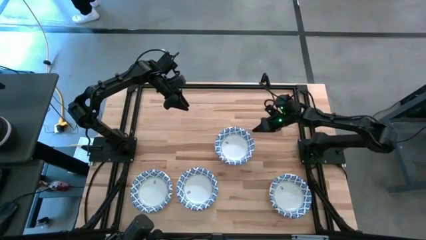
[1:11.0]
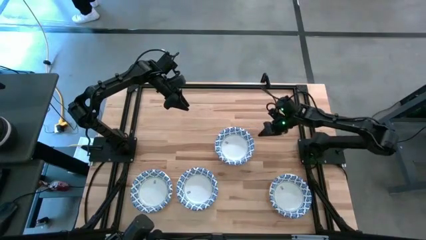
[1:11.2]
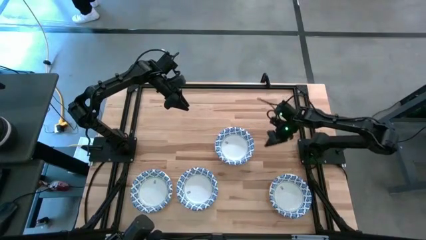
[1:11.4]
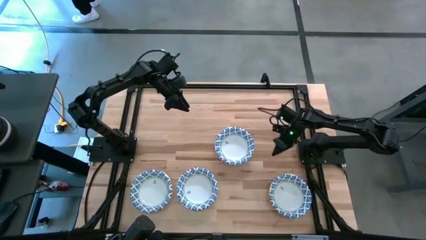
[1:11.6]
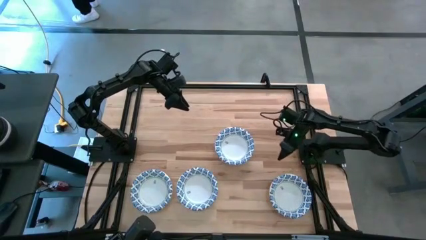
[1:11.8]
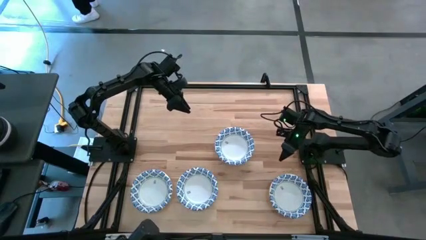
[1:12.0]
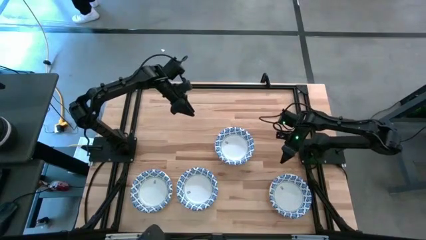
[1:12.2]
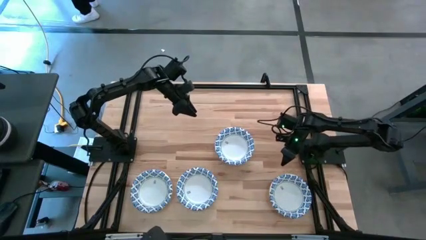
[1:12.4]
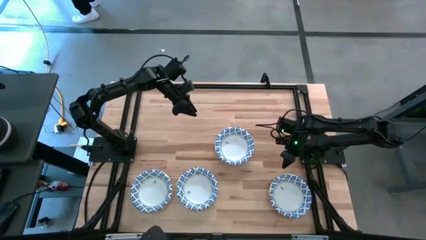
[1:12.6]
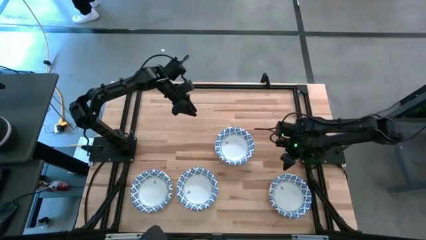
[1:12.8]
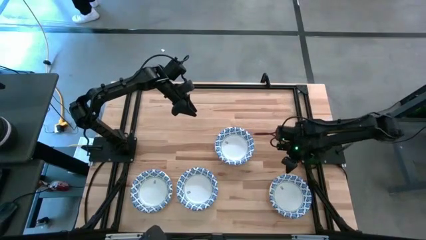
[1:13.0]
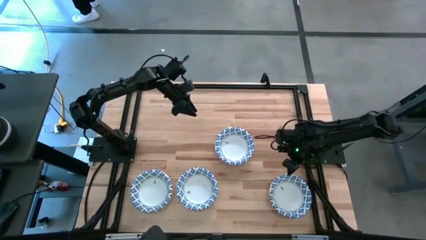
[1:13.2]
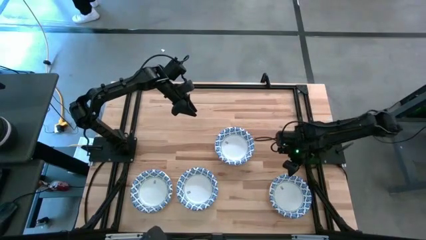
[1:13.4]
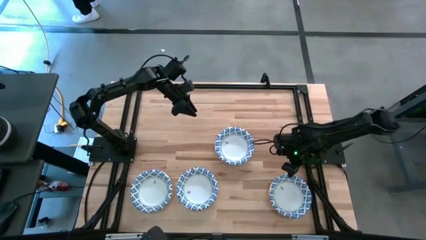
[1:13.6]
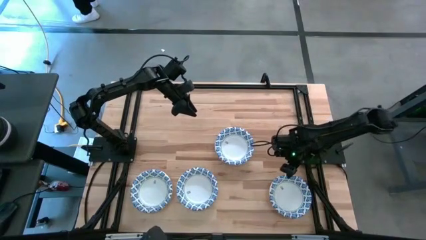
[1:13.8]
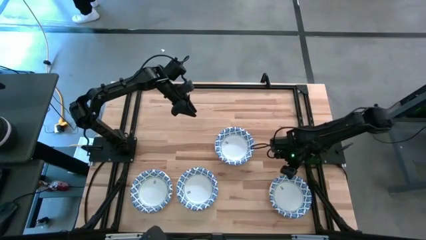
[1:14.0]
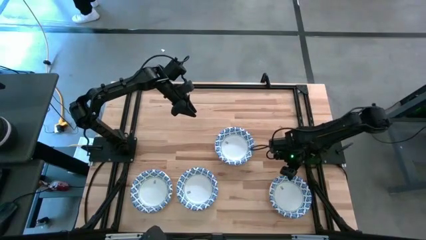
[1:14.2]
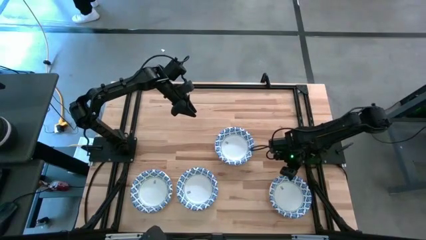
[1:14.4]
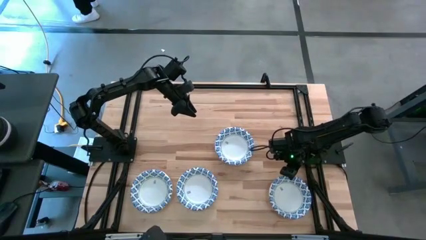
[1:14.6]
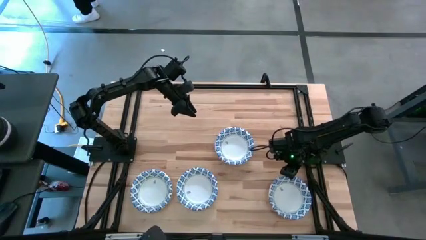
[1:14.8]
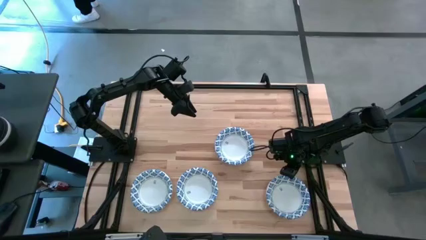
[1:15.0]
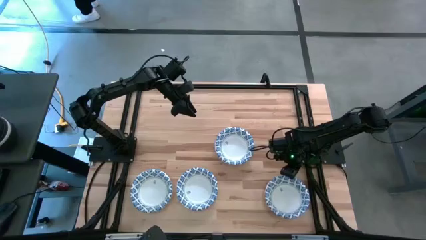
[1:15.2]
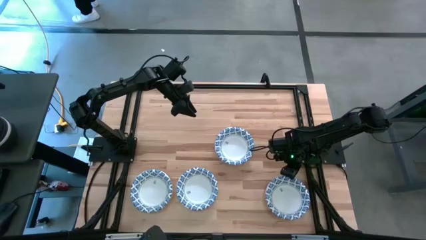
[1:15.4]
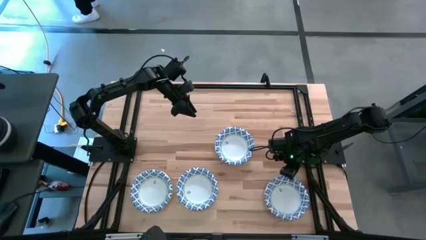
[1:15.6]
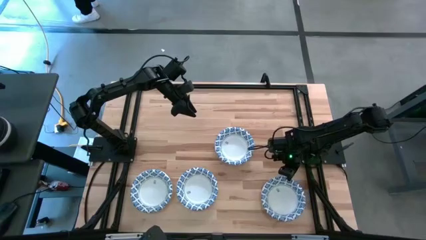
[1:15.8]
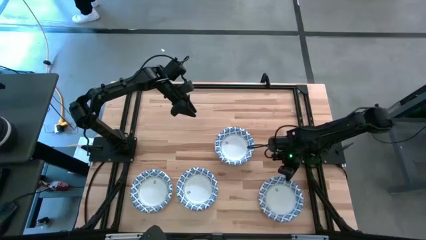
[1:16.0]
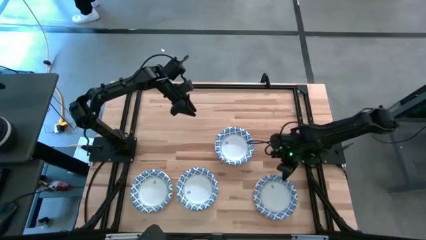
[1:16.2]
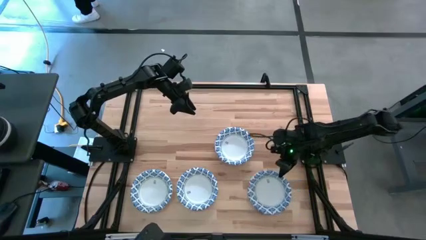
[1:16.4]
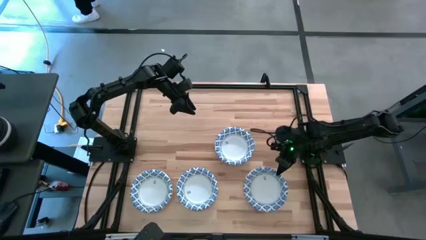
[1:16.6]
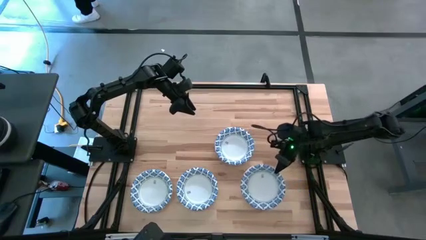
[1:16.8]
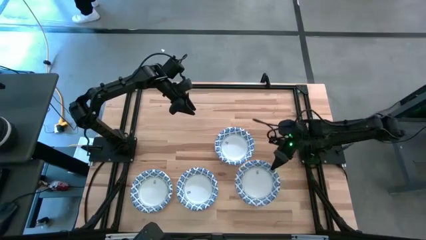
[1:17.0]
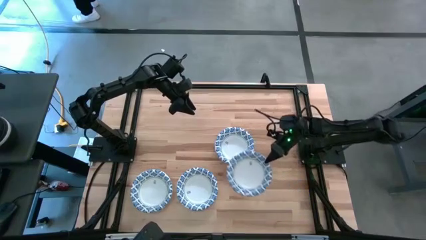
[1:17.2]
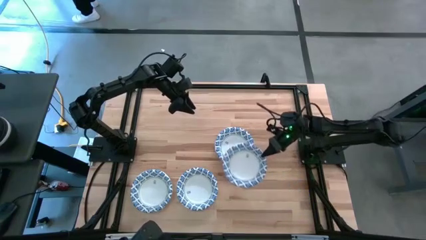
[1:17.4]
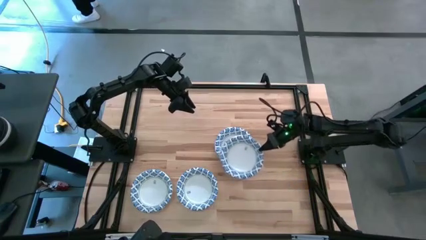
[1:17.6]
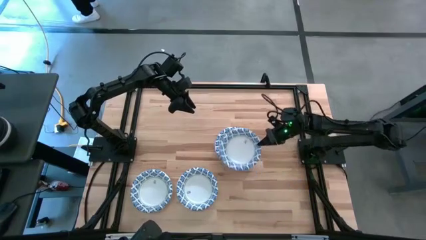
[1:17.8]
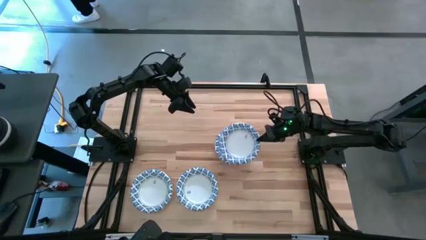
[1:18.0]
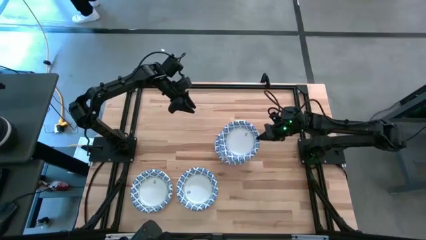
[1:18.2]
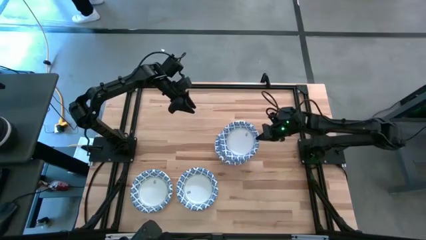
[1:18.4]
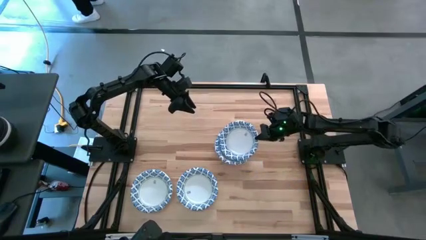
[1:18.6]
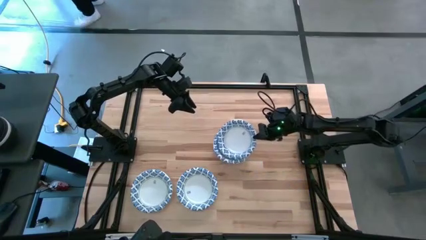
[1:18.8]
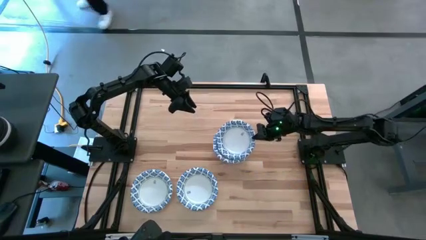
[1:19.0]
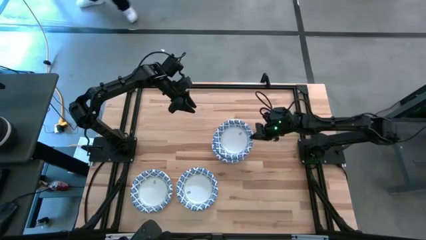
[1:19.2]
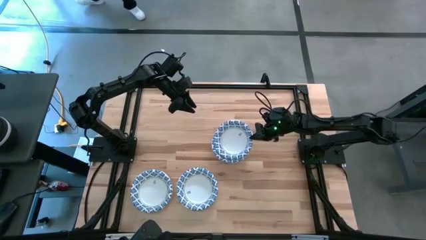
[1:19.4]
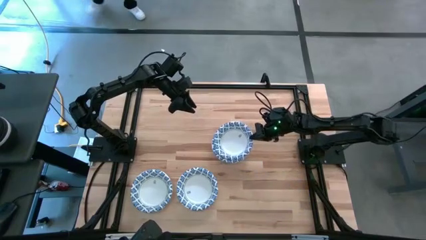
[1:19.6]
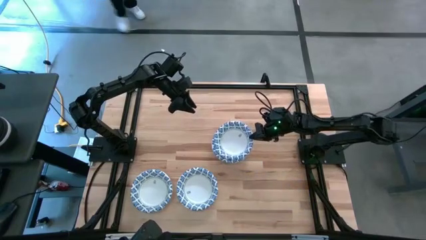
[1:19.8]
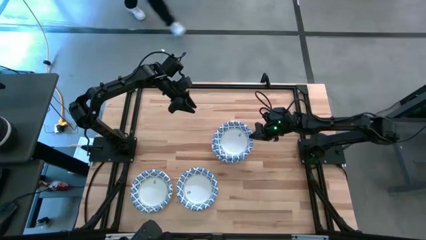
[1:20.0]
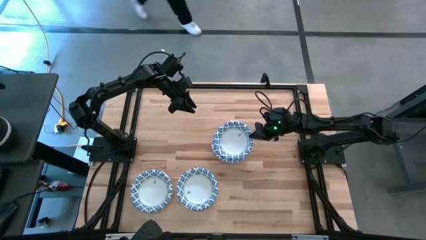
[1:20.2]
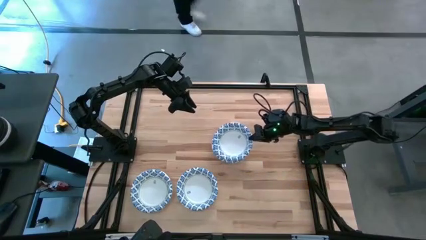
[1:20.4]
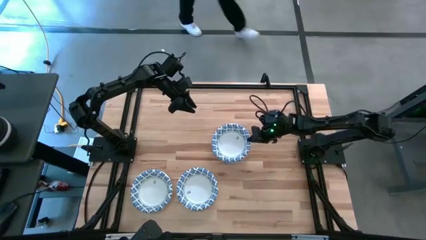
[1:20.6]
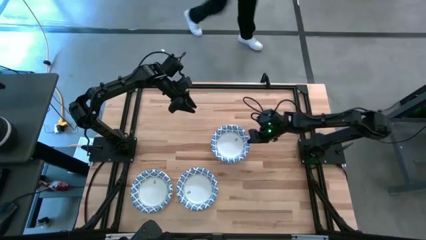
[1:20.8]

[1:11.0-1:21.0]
Task: Nest bowls inside each other
Stack the white patterned bowl on top of the other white patterned bowl

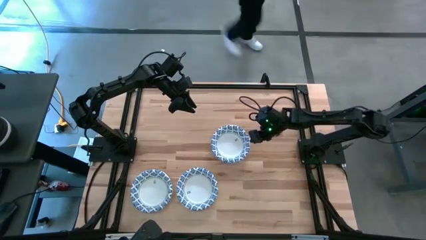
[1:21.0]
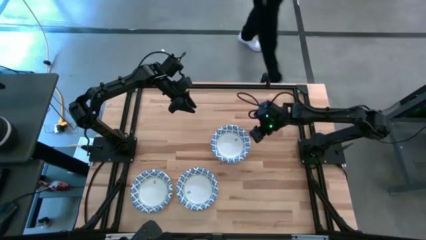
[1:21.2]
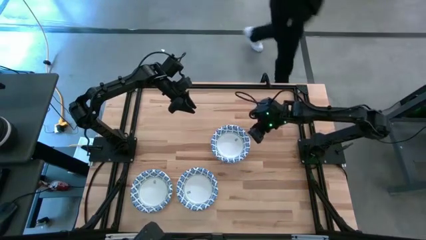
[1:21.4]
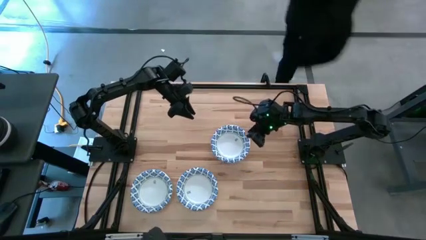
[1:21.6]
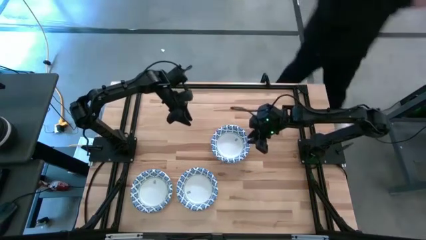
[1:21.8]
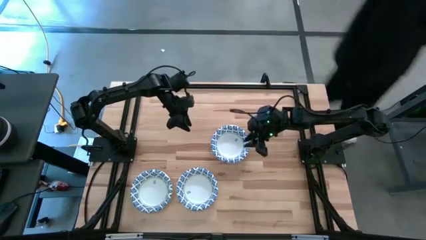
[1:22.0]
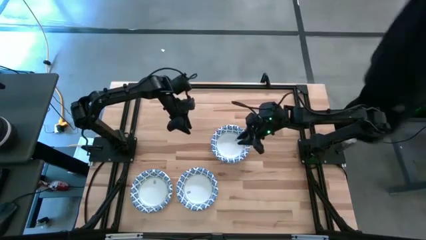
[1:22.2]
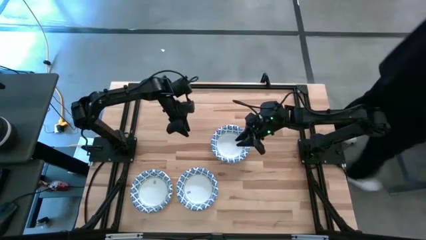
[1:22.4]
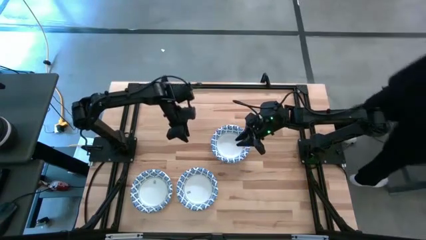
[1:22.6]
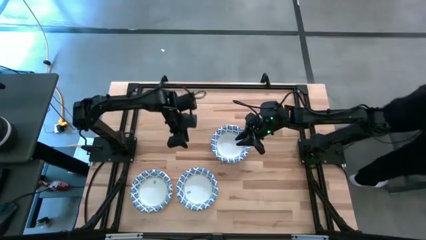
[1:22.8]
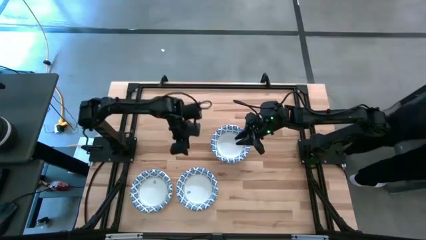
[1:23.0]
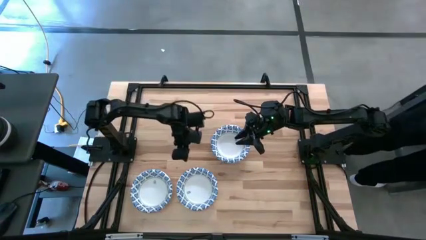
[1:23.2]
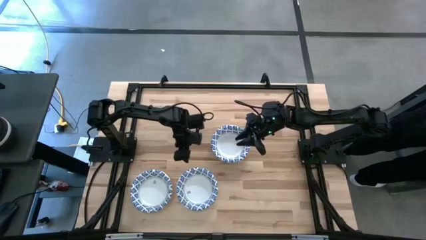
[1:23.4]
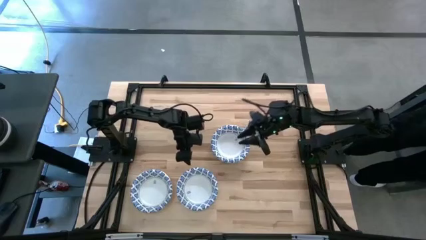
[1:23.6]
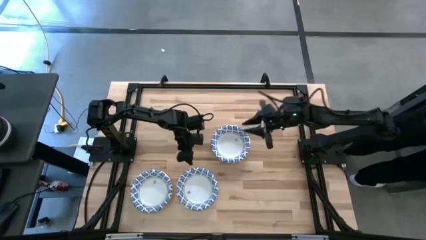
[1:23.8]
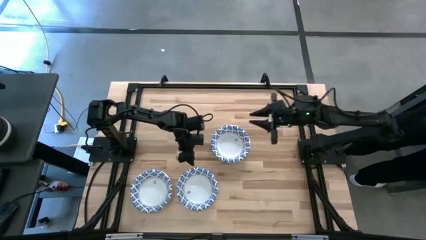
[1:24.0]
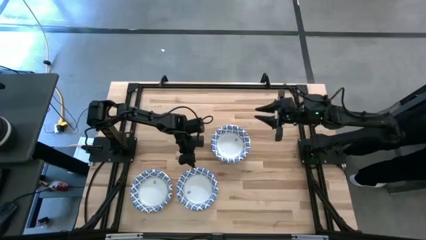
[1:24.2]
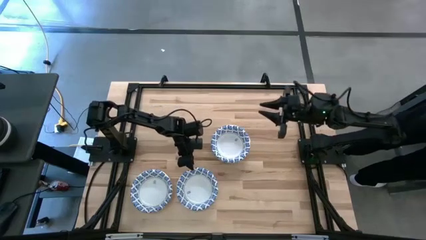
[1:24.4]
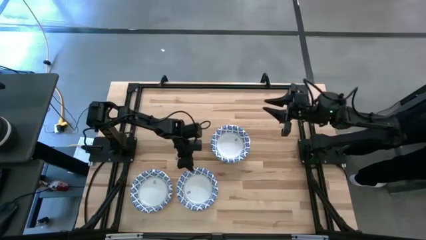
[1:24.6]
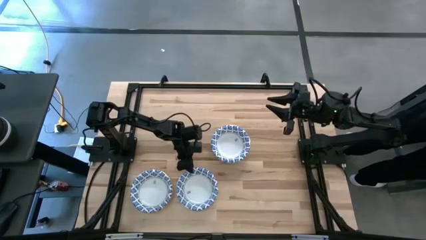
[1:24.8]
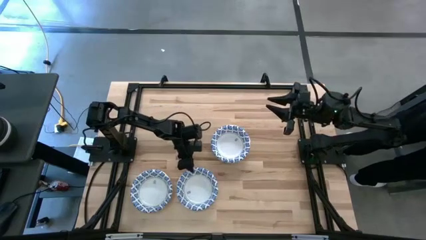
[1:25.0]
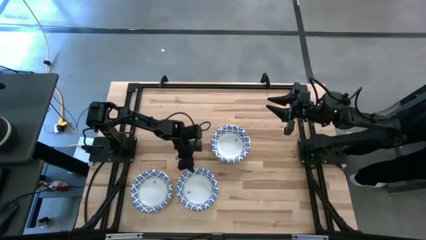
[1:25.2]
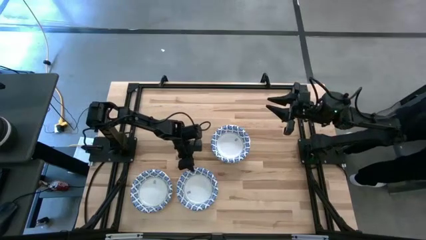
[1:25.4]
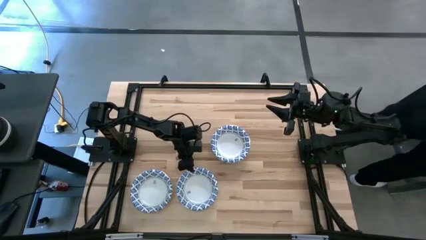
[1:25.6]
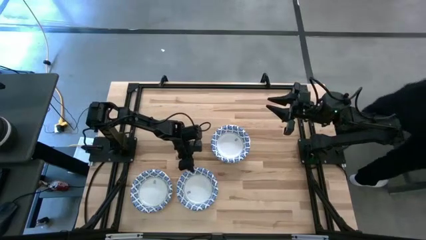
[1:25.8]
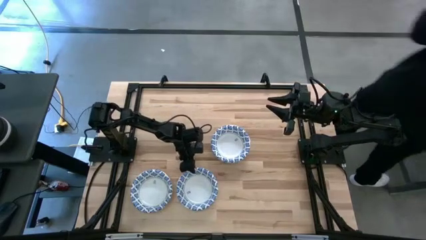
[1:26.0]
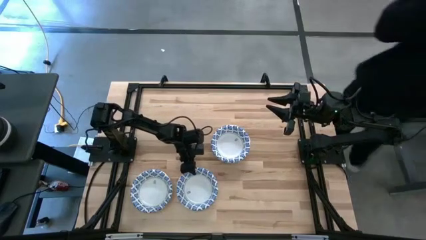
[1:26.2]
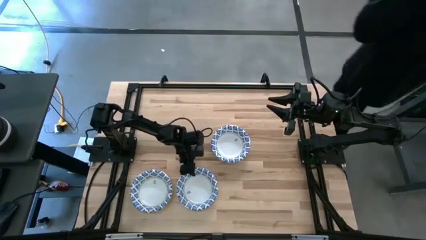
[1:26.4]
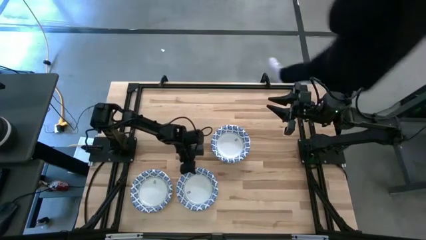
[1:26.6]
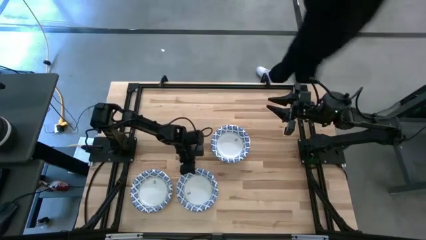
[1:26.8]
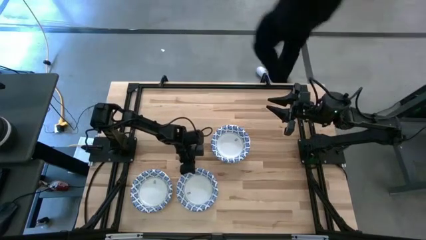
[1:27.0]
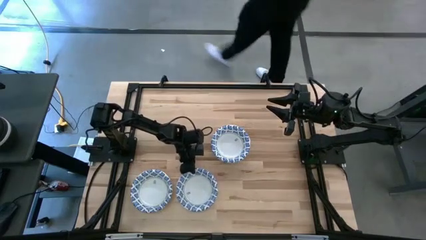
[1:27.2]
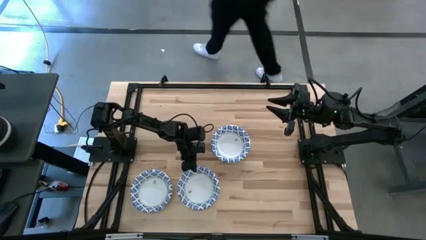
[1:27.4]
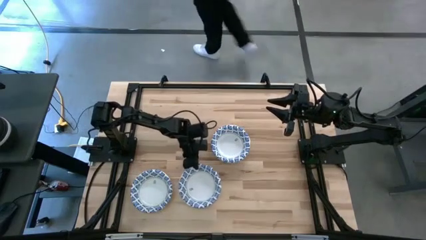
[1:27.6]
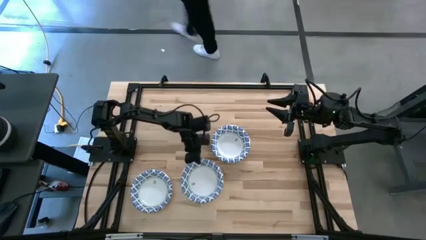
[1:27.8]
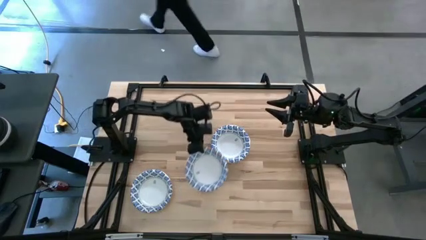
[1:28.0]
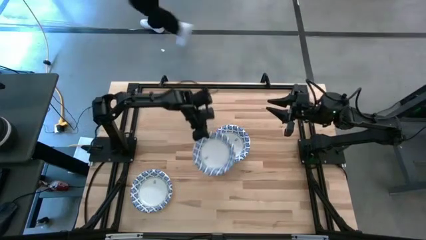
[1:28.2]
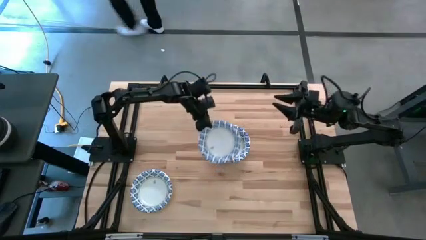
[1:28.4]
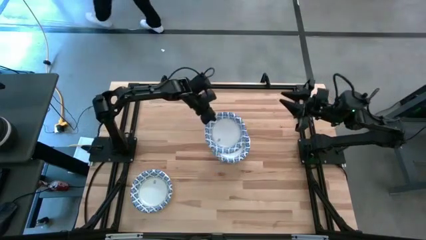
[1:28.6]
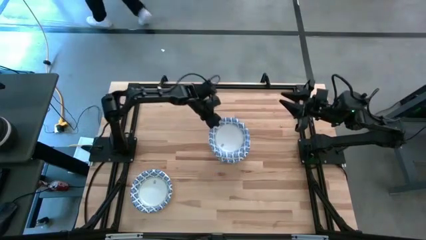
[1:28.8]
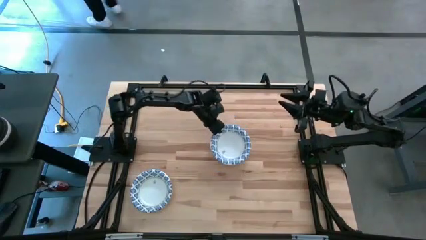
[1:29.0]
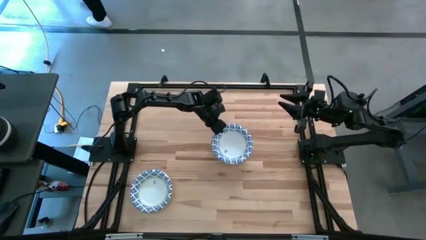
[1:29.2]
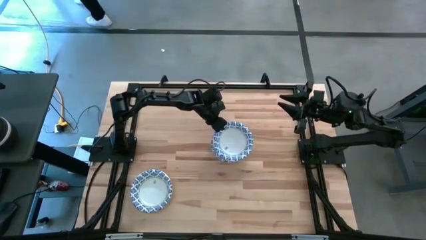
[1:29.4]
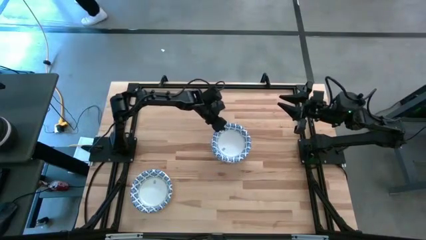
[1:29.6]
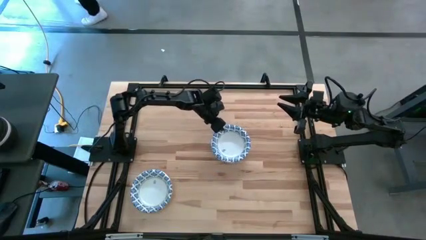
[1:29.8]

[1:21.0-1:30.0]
Stack the white patterned bowl on top of the other white patterned bowl
